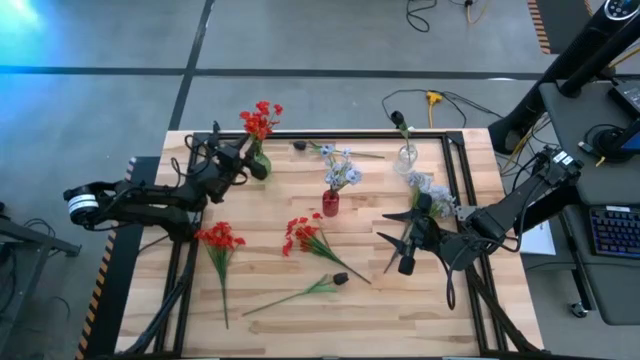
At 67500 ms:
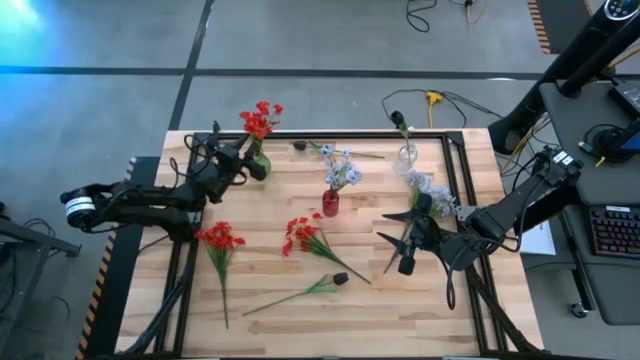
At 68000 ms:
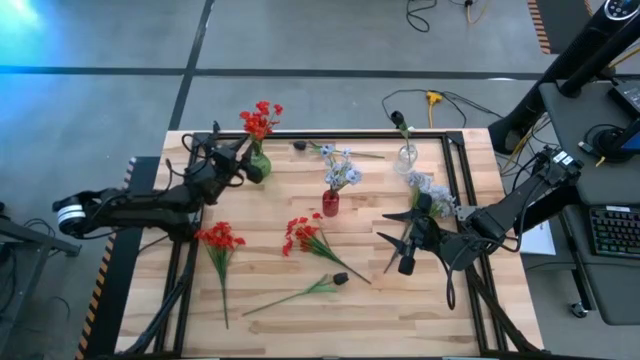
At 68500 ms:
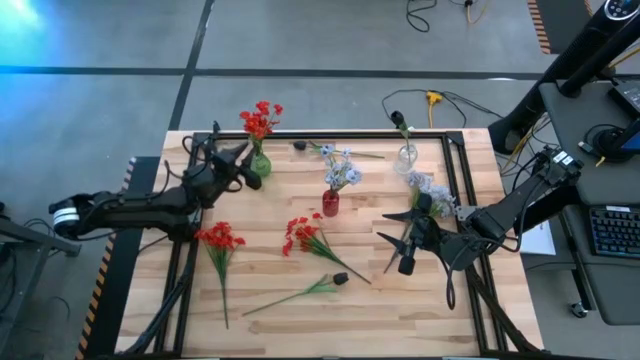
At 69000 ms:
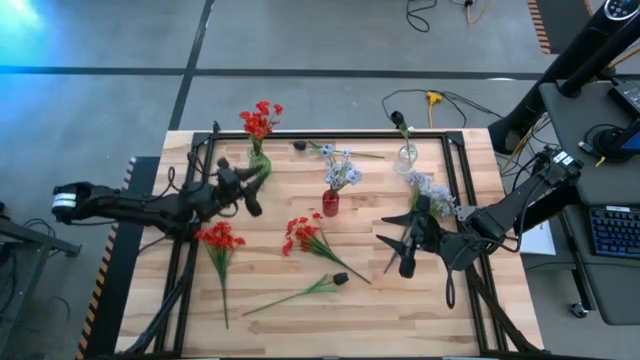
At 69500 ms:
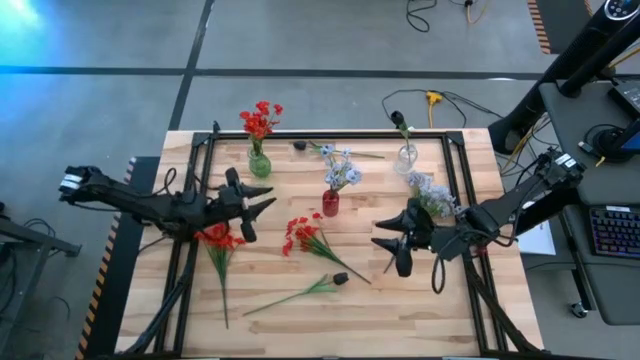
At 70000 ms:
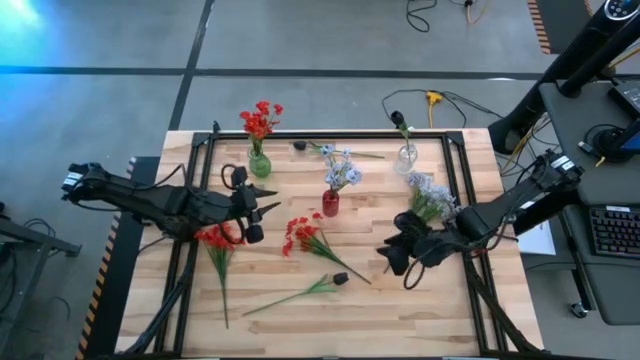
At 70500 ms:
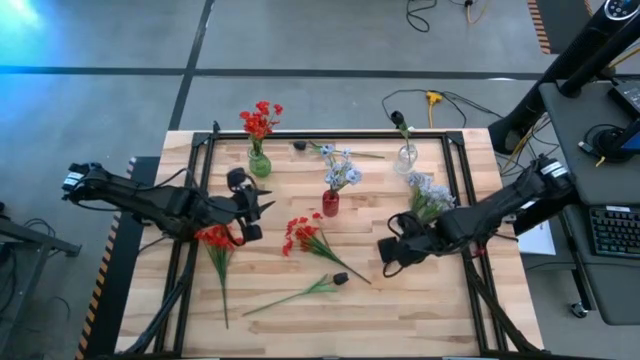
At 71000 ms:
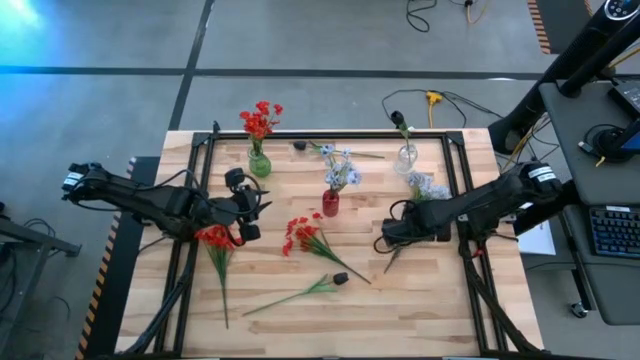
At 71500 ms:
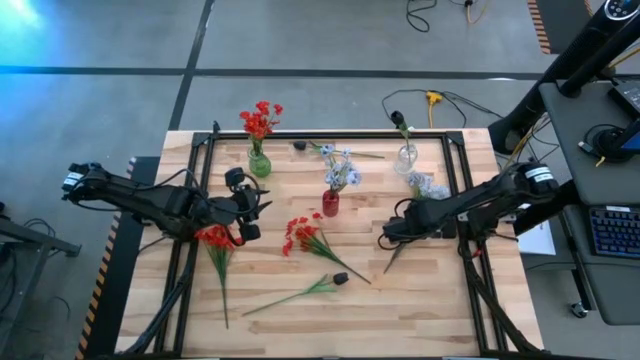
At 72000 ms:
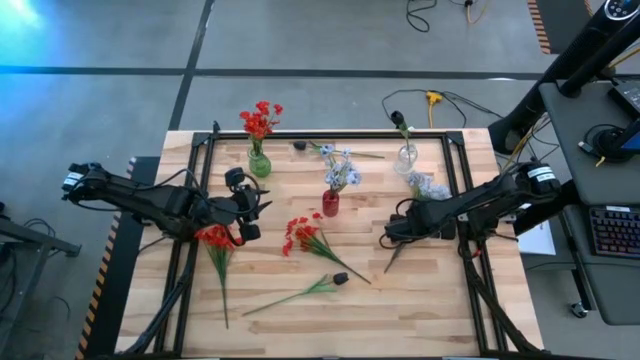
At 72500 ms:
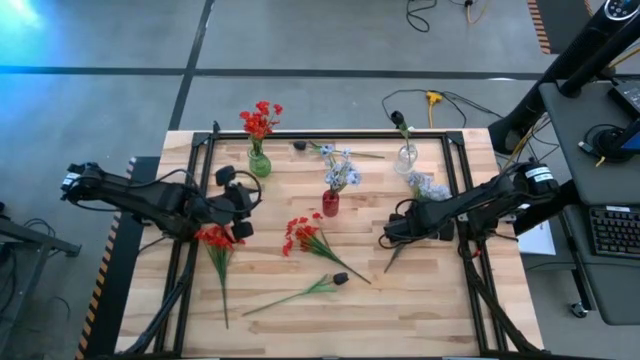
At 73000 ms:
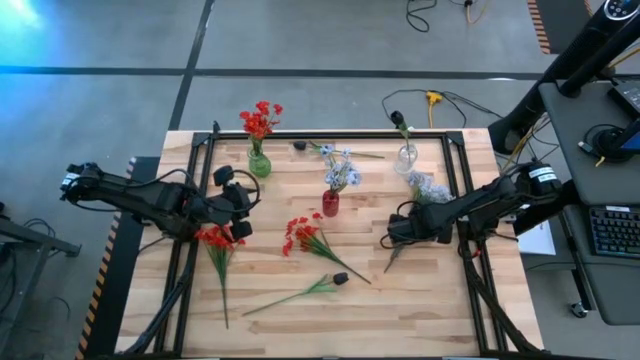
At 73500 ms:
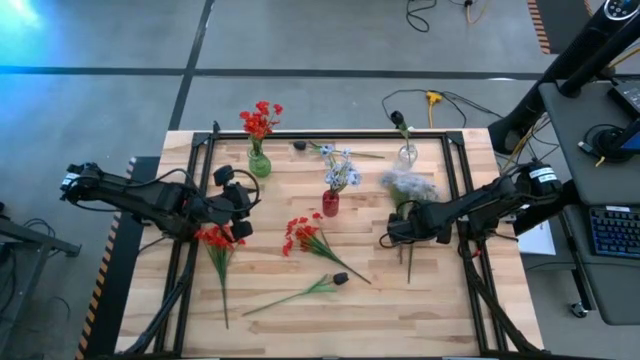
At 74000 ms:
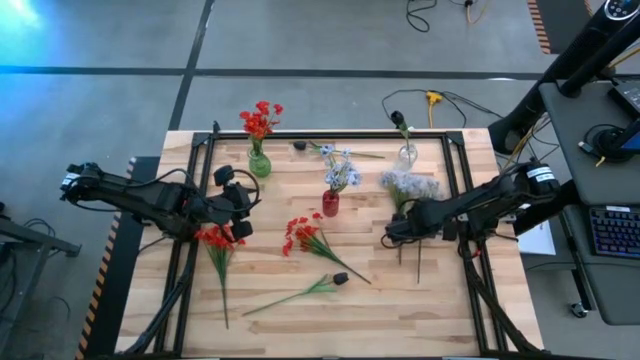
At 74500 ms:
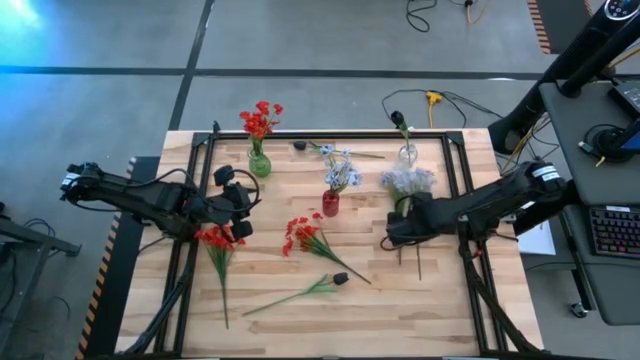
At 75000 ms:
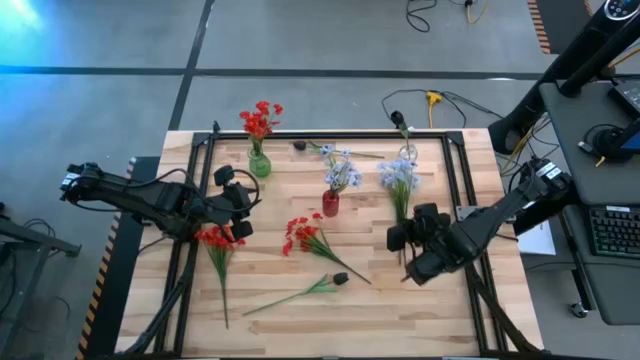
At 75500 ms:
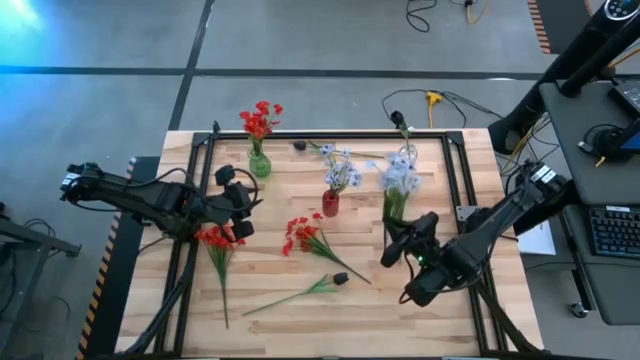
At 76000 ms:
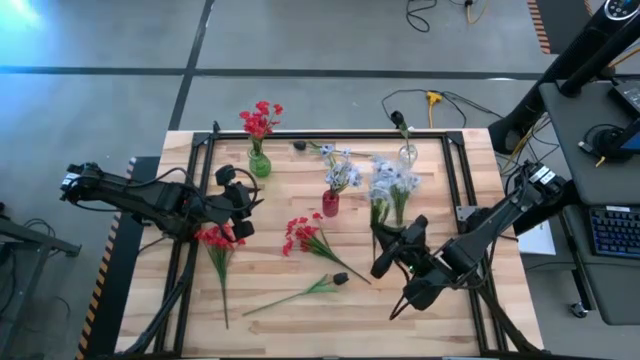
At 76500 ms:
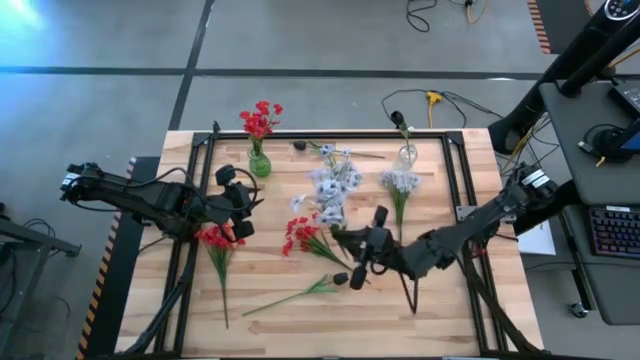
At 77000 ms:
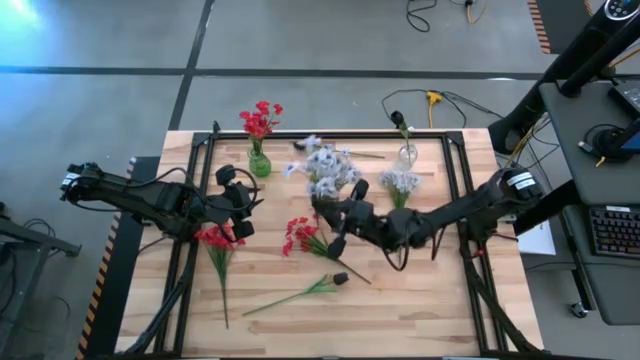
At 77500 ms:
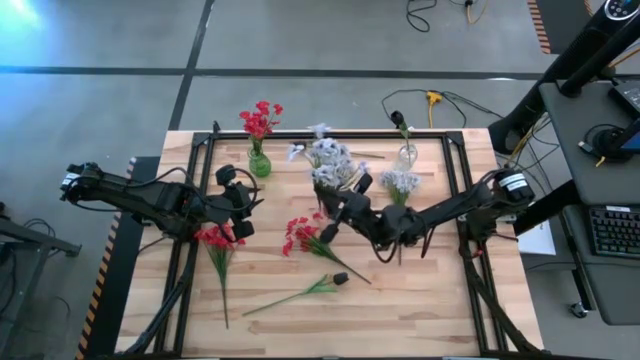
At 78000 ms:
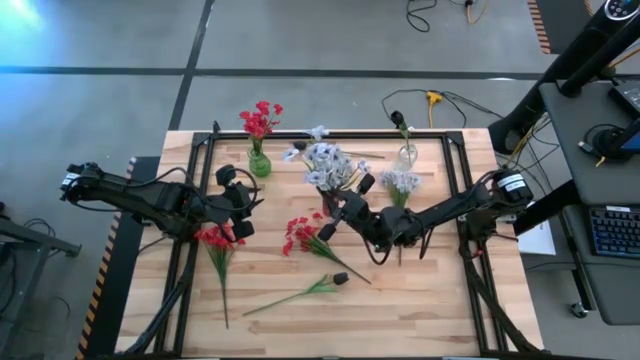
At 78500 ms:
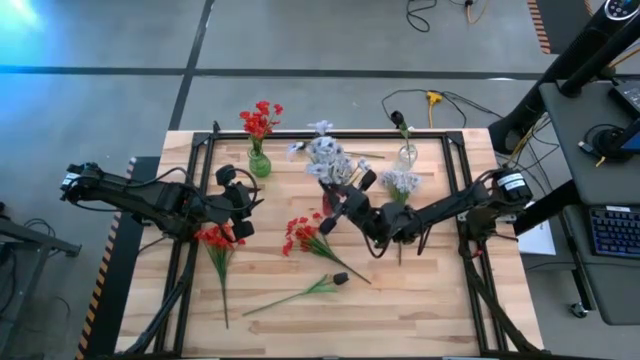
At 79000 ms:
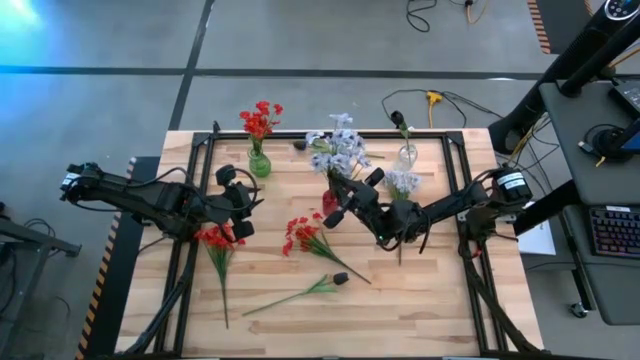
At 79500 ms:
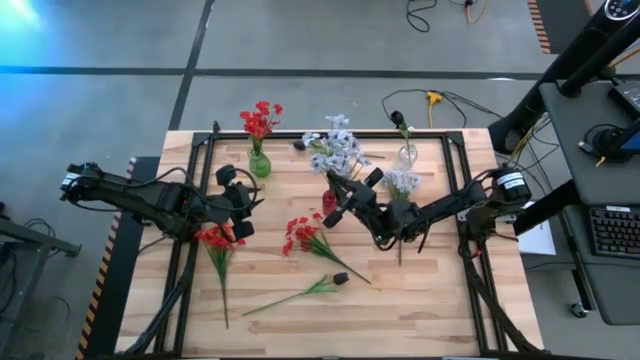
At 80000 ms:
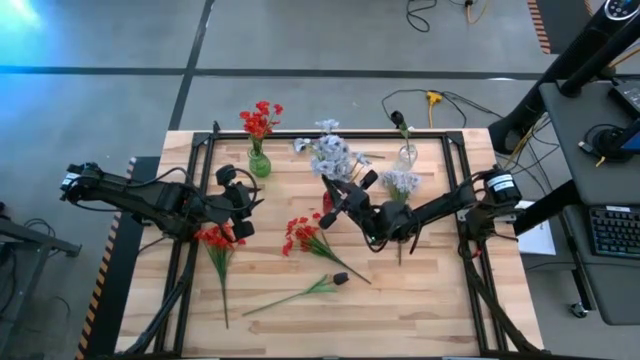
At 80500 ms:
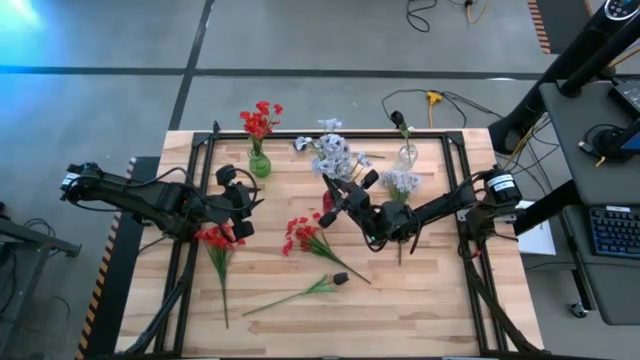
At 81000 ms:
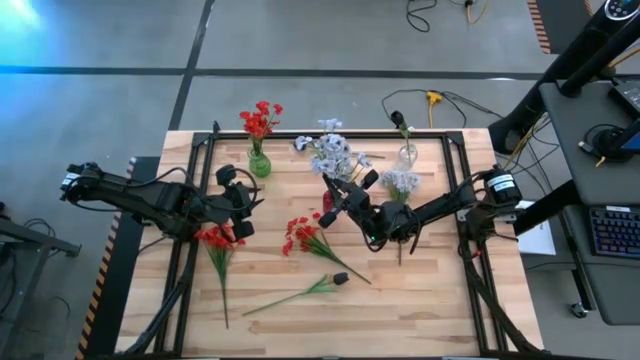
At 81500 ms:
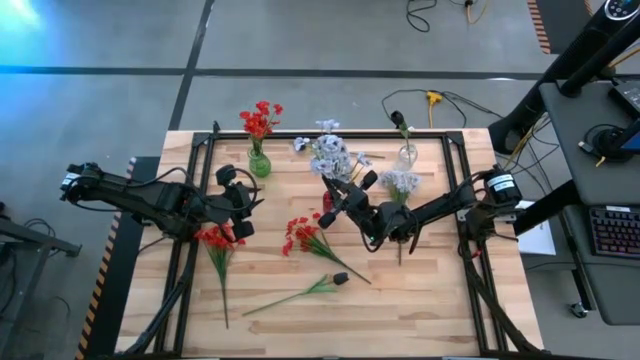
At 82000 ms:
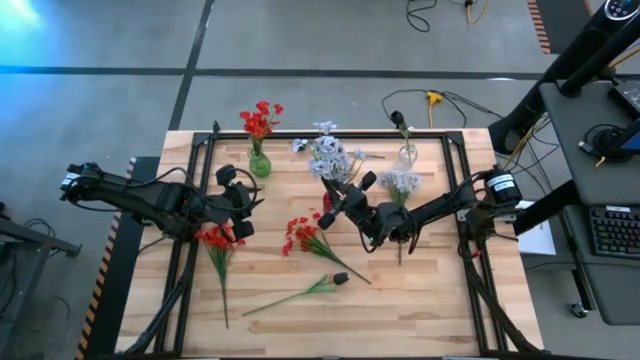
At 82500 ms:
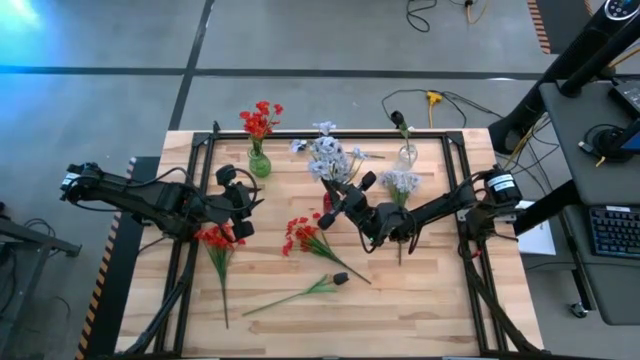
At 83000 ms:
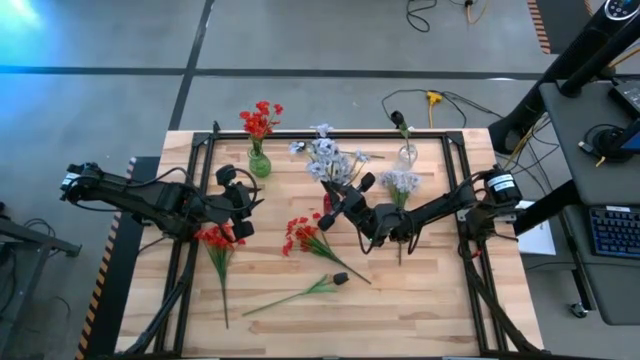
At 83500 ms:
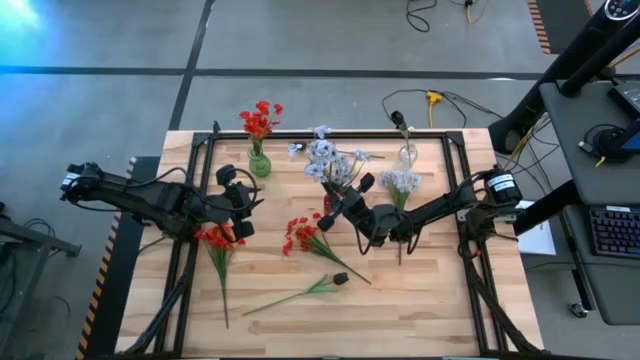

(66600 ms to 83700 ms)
Task: Sort flowers into vase by color
Put the right white flowers into the red vase

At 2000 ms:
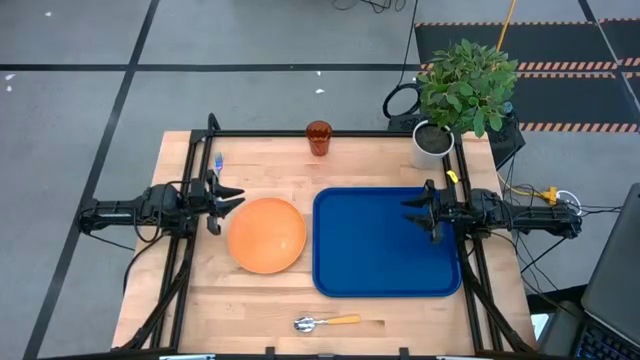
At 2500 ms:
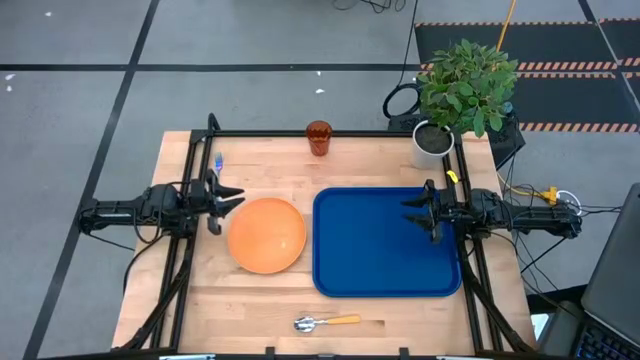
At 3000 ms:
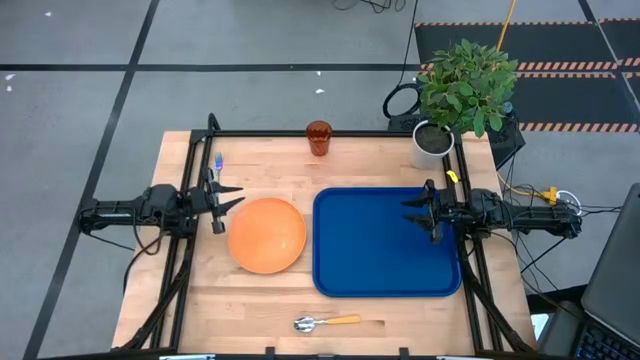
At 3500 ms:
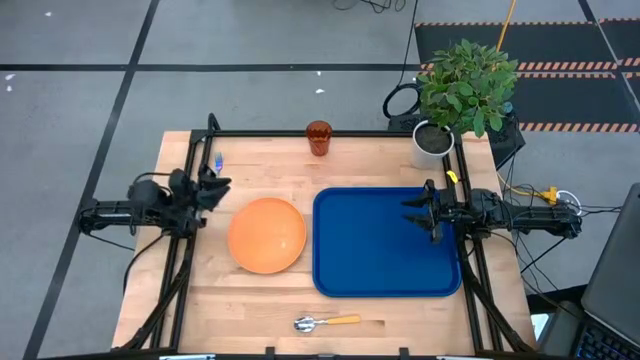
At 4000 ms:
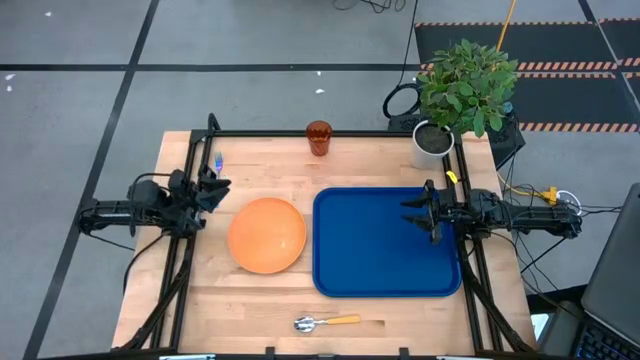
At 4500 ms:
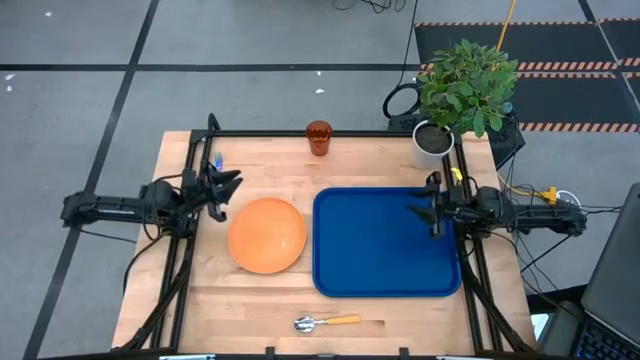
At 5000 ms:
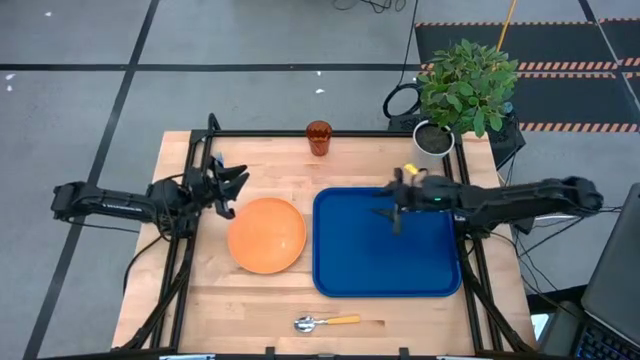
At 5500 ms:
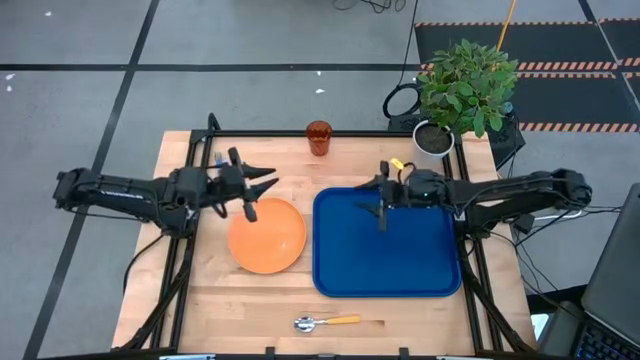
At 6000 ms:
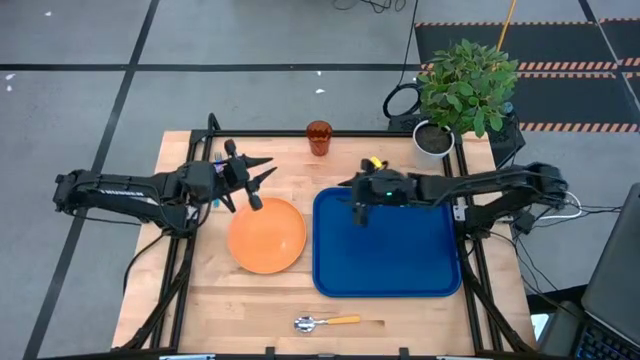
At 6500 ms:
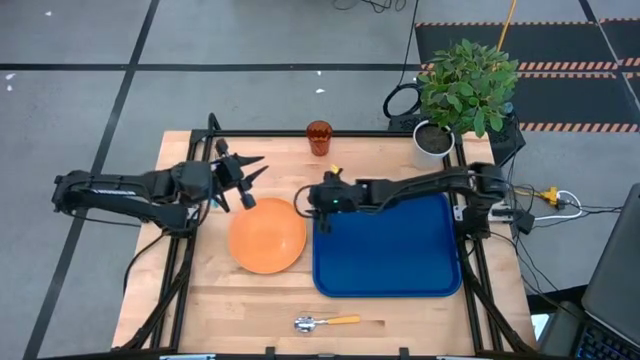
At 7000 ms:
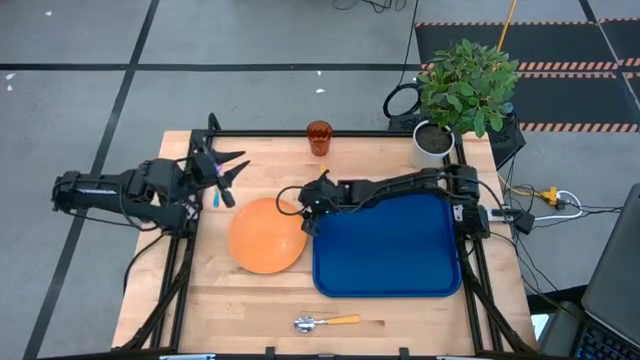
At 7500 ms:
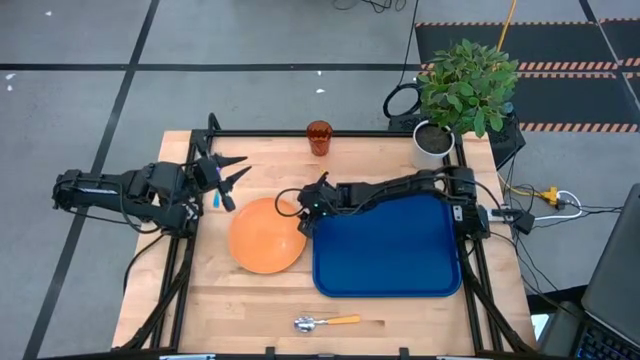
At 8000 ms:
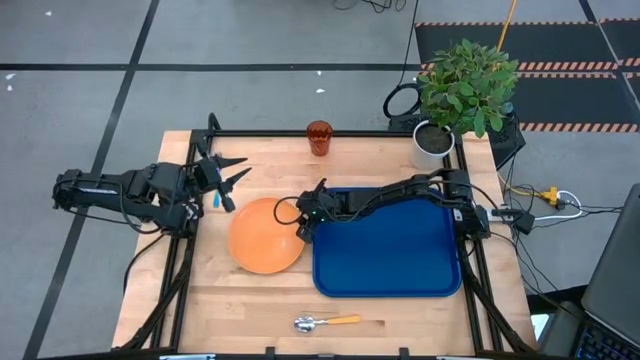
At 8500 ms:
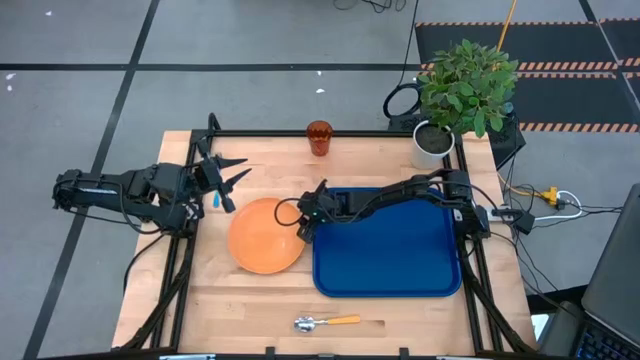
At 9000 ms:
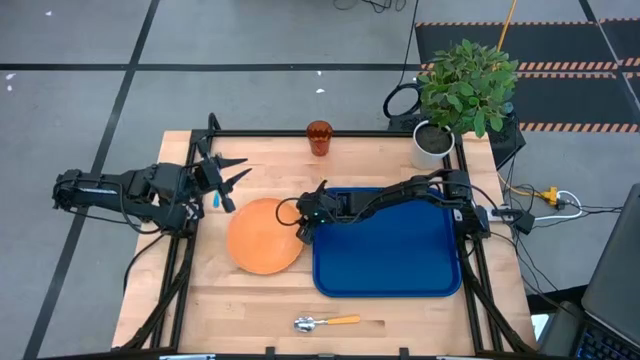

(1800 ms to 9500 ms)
Task: Pick and place plate/cup/fork/spoon on tray
Put the orange plate on the middle of the blue serving tray
